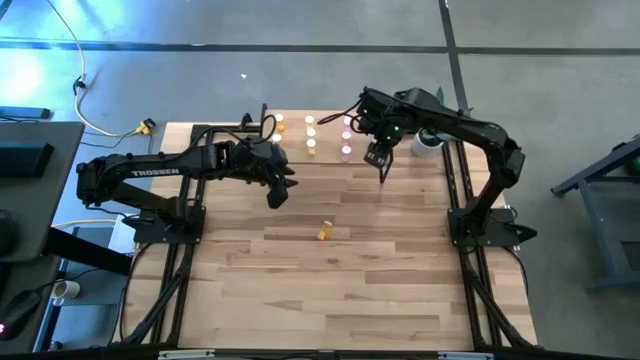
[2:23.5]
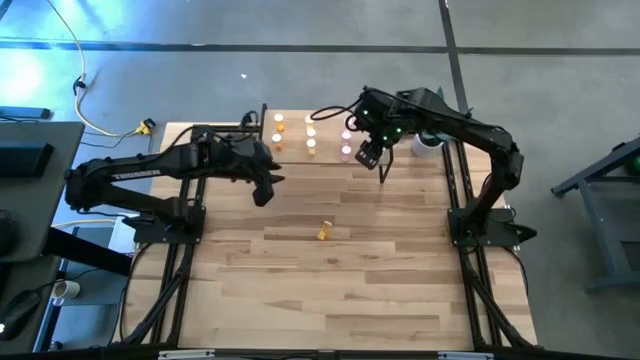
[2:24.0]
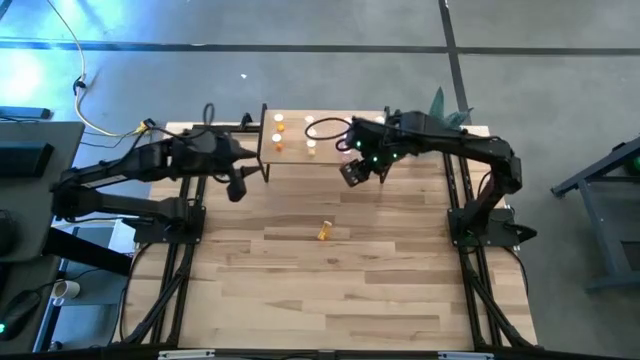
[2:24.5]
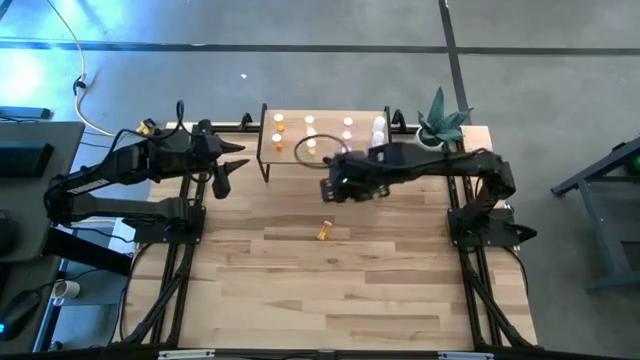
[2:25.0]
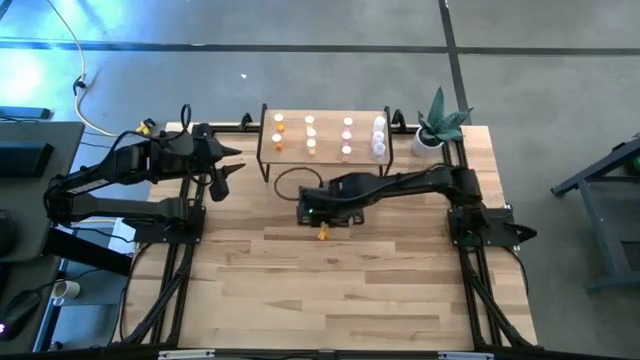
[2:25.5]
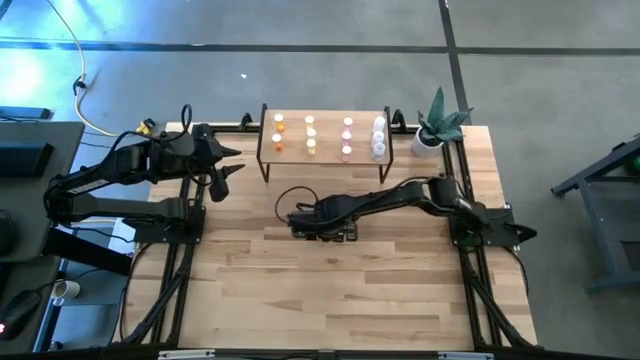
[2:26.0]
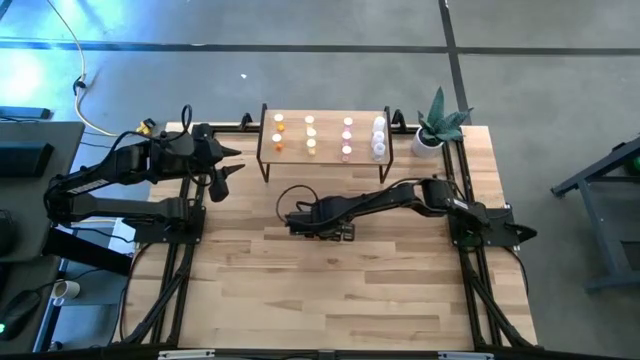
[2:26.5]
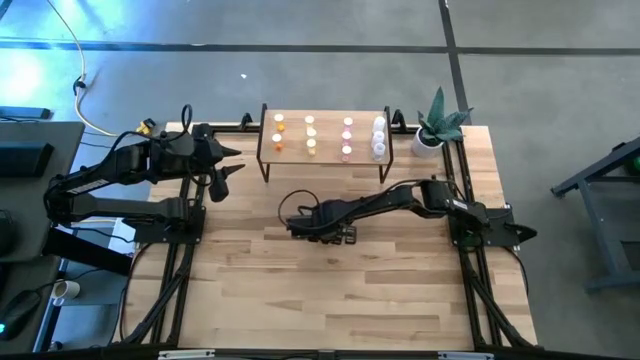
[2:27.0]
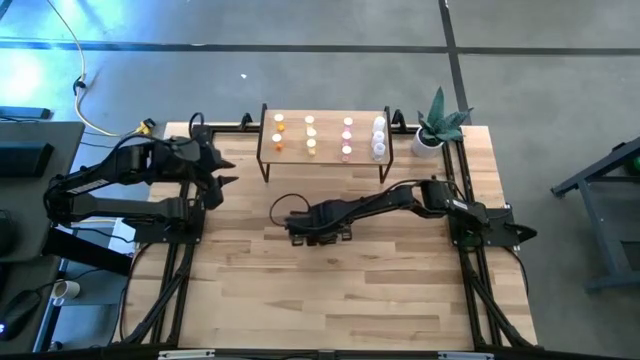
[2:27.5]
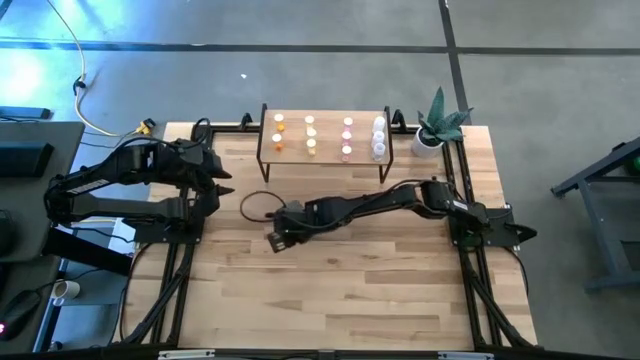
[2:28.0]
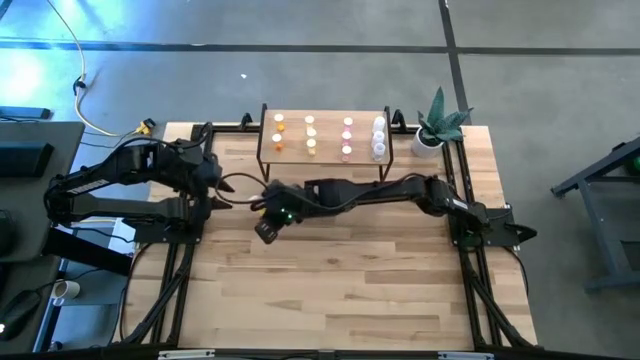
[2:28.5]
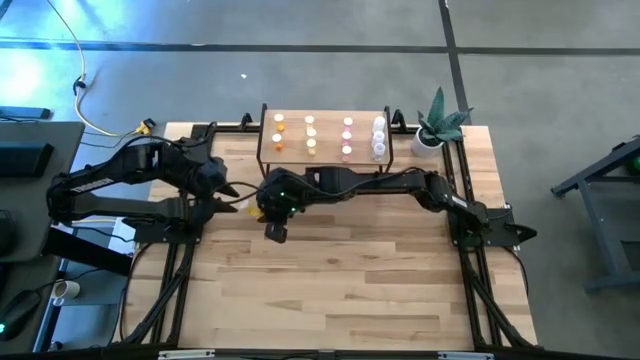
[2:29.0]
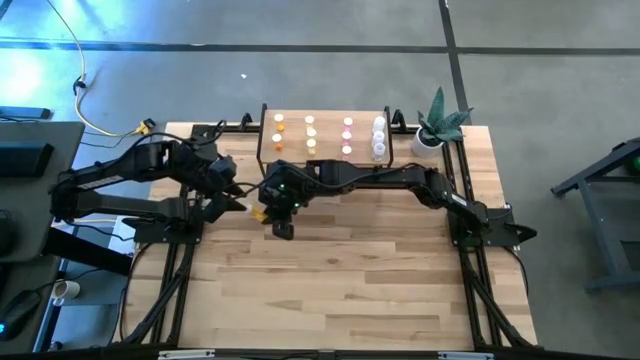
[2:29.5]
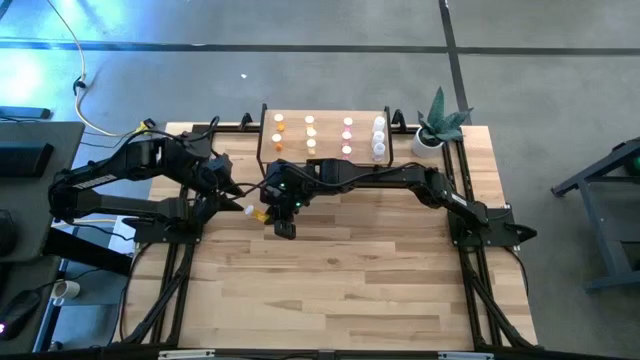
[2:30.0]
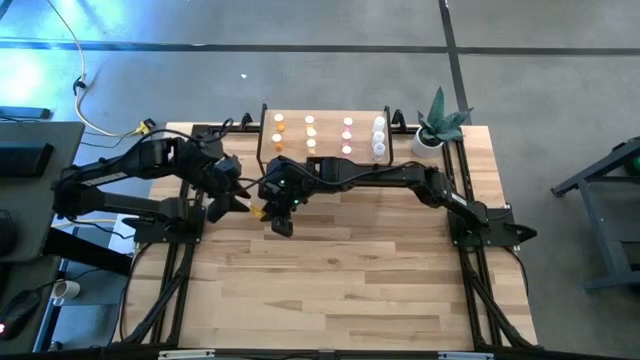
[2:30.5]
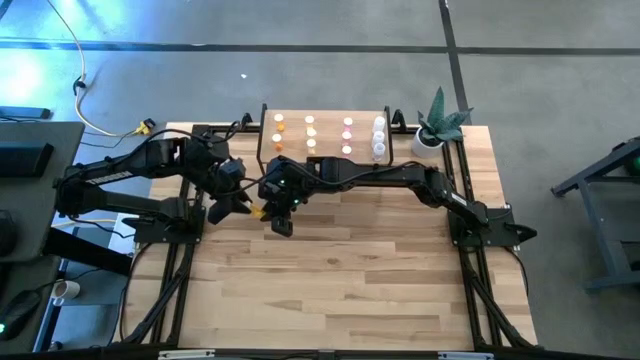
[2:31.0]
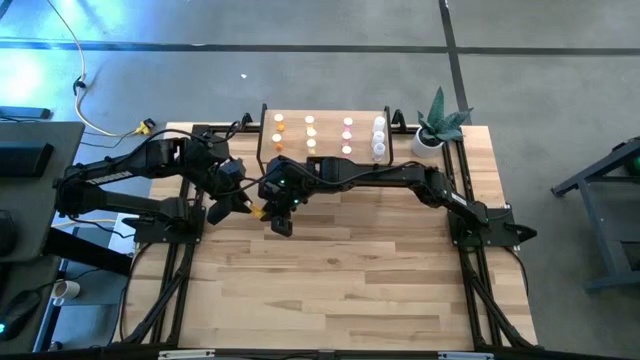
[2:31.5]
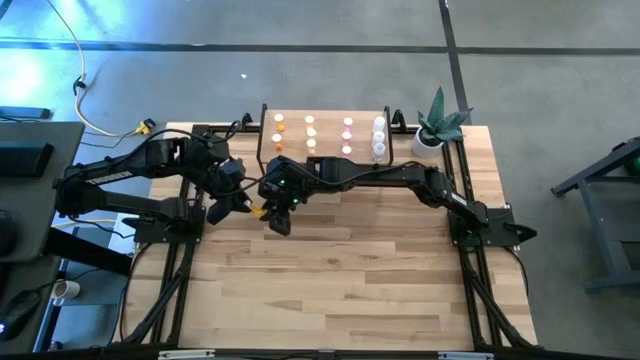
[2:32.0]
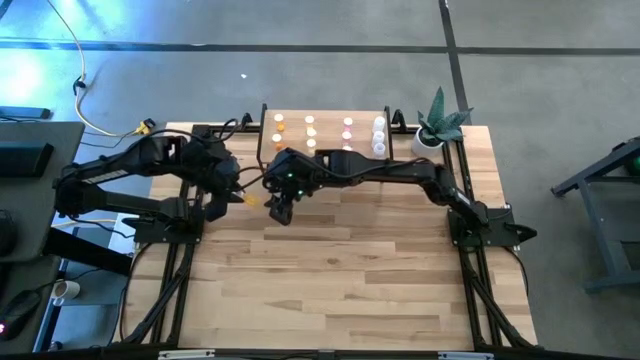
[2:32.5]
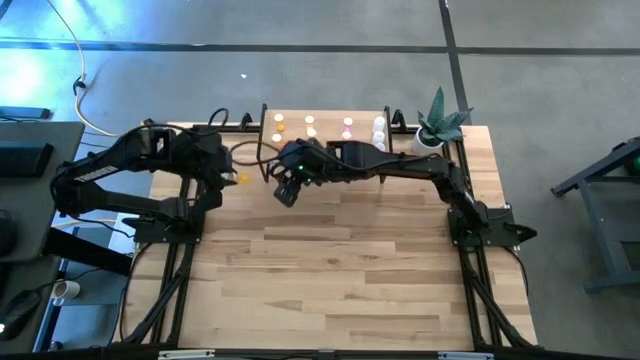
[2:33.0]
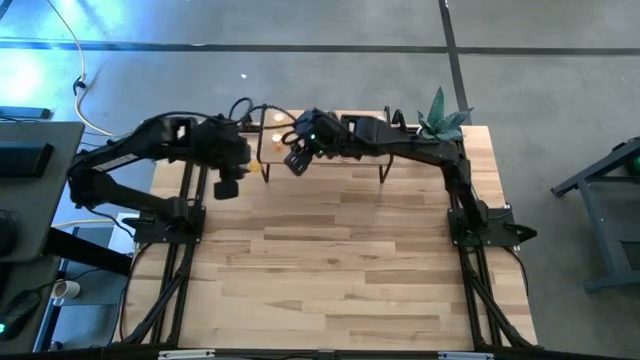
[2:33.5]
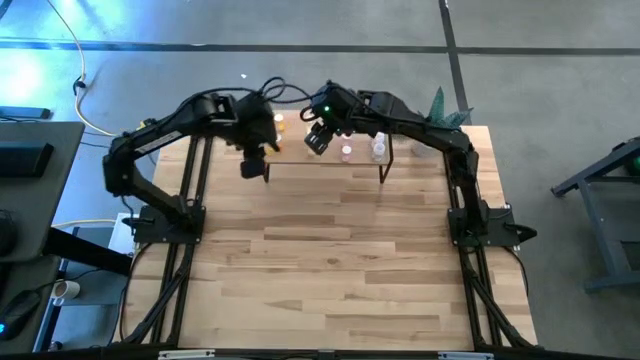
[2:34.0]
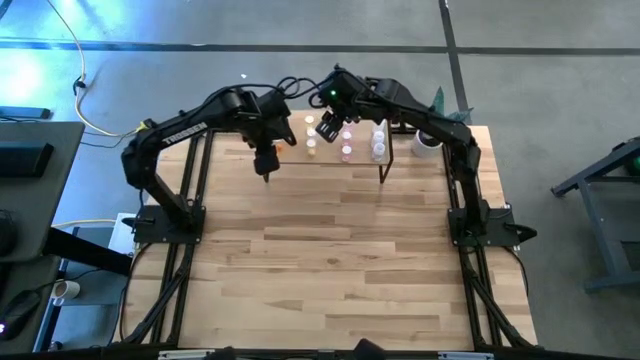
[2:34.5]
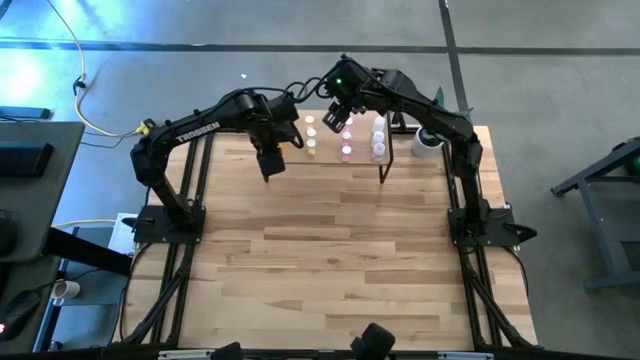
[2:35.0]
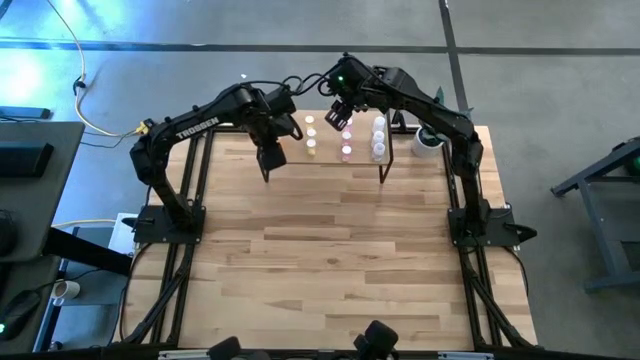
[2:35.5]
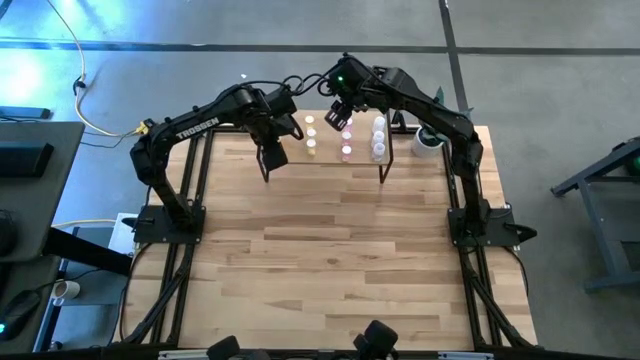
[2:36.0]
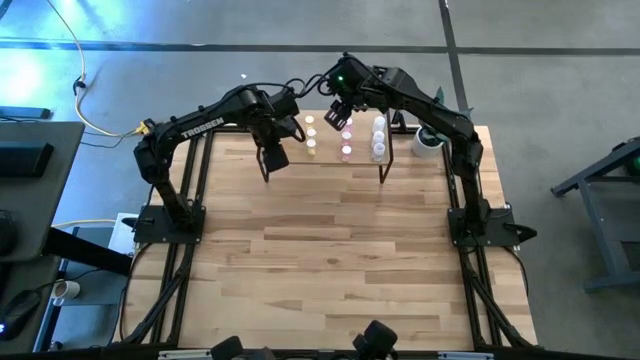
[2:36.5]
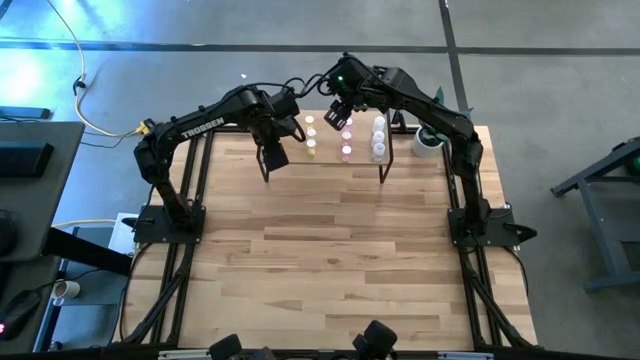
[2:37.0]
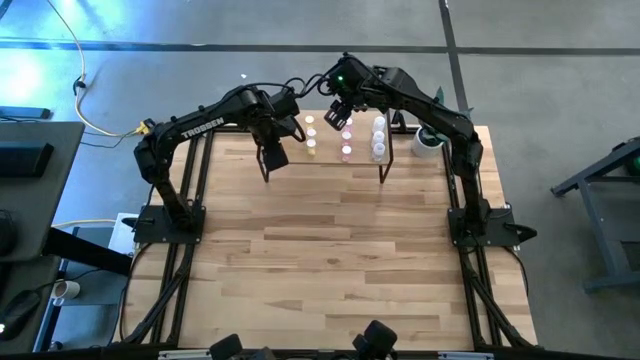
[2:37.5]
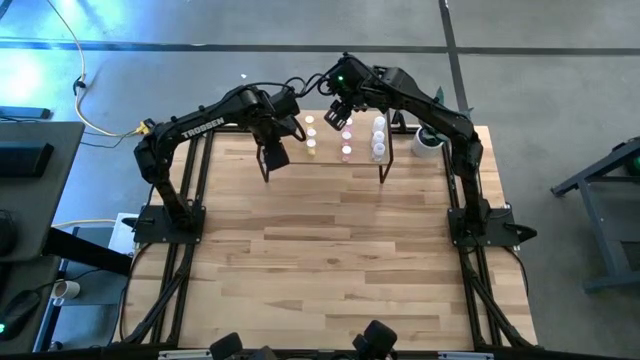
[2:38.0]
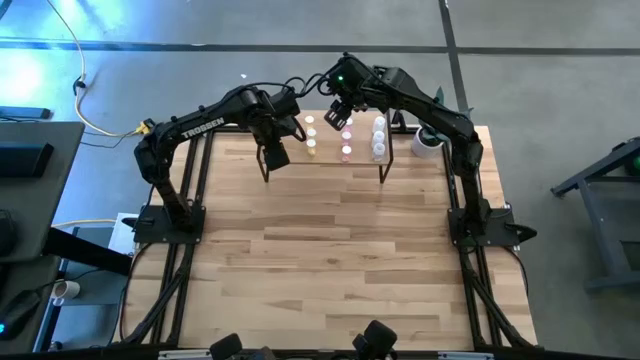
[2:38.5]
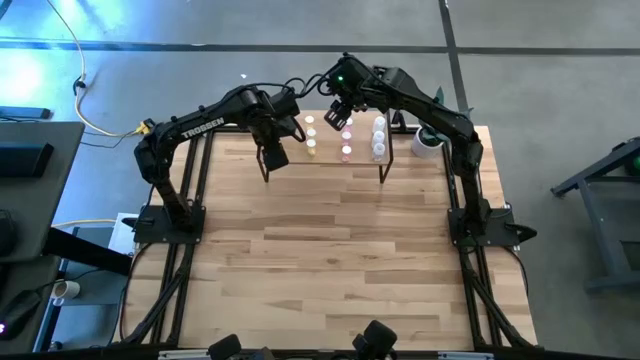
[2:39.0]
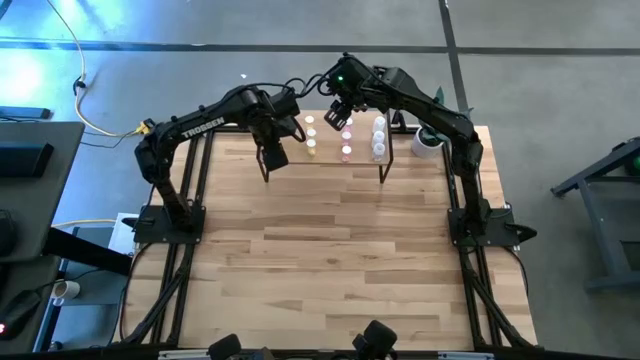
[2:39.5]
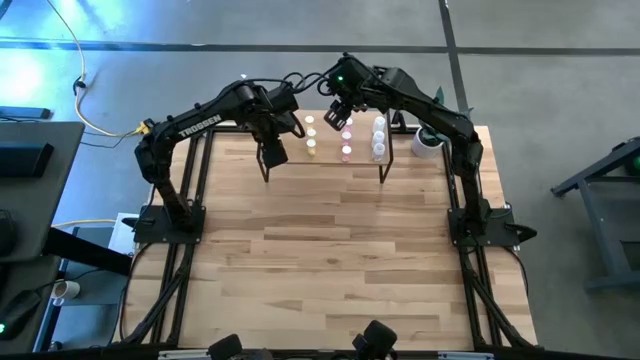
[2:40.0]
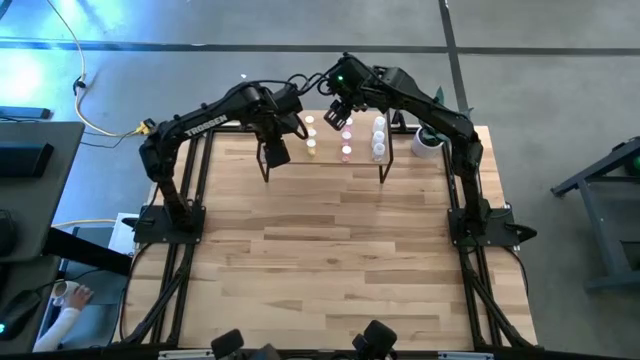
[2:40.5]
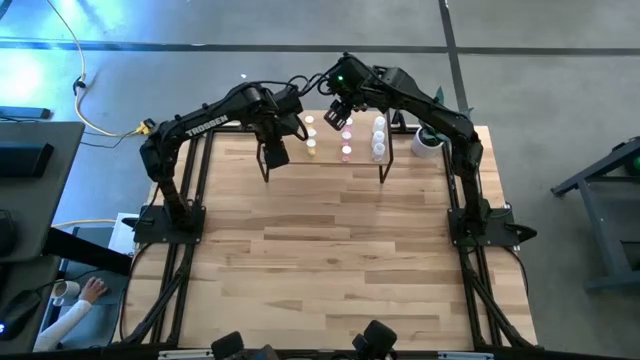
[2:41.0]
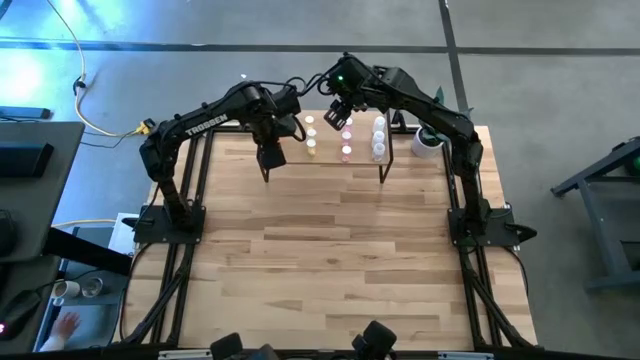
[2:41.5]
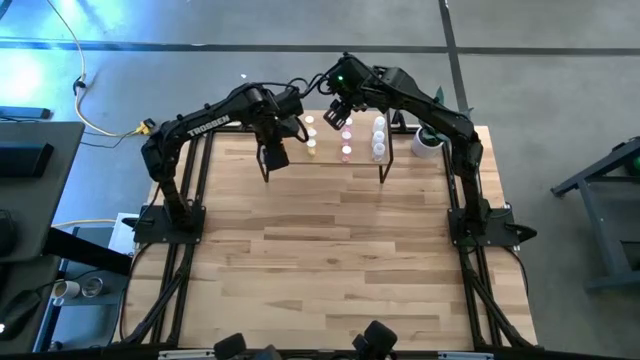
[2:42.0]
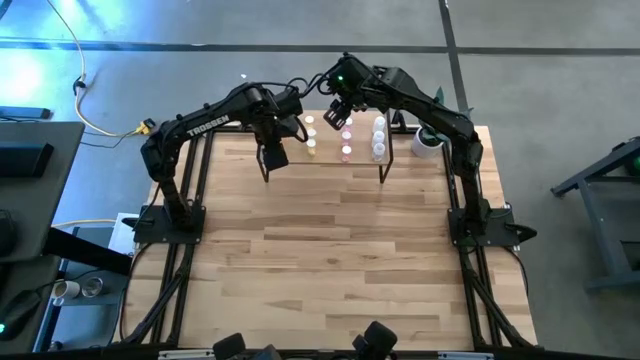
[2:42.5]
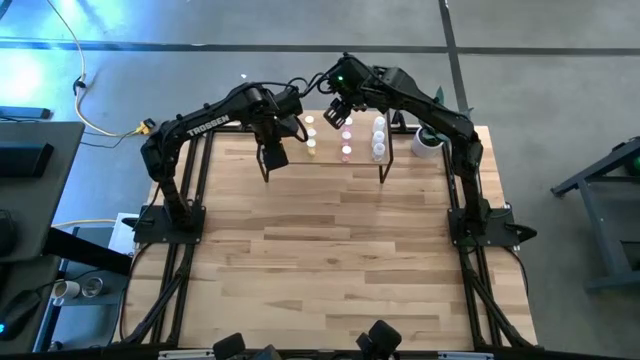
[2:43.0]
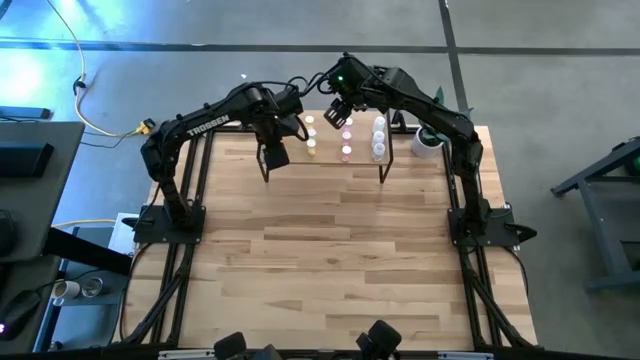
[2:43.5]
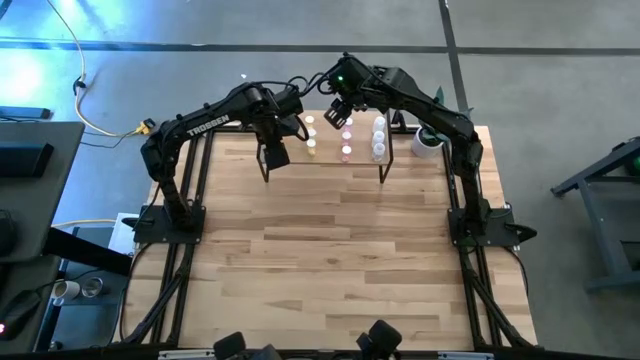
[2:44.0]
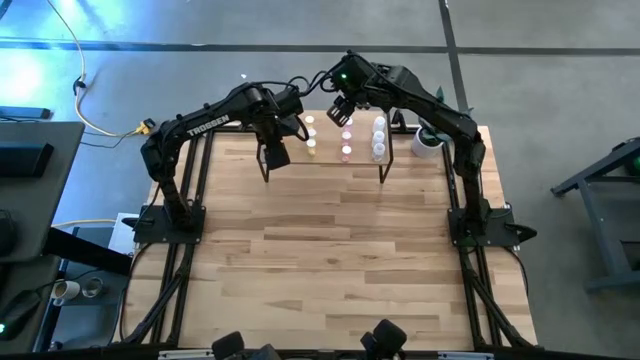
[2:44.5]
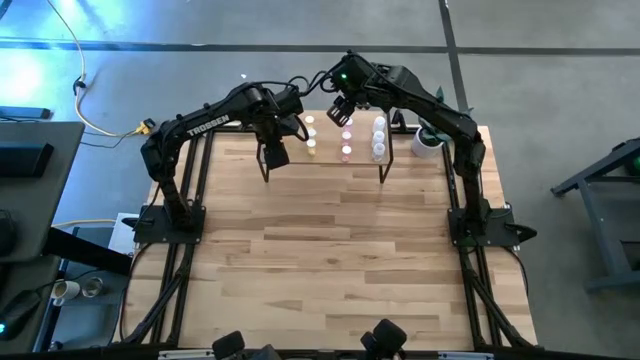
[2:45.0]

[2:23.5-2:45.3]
Task: Pick and place medicine bottles onto shelf by color
Put the orange pill bottle on the shelf aligned with other orange pill bottles
